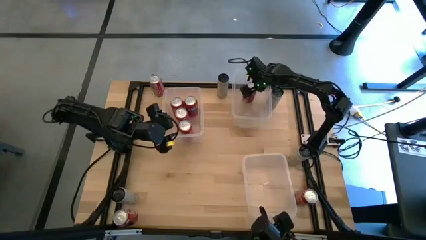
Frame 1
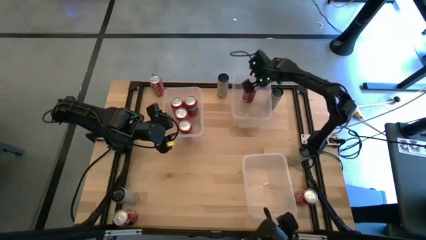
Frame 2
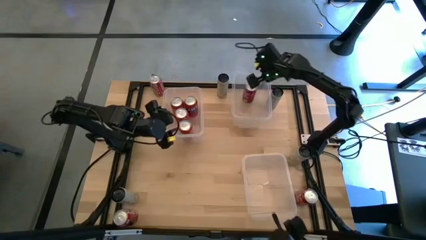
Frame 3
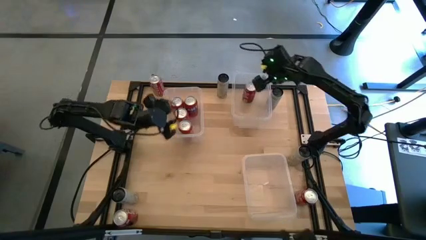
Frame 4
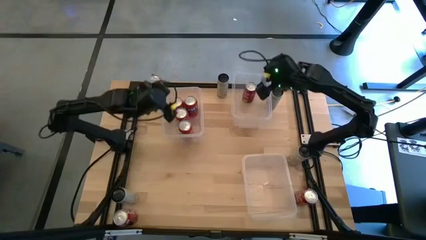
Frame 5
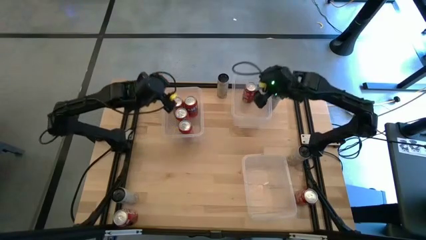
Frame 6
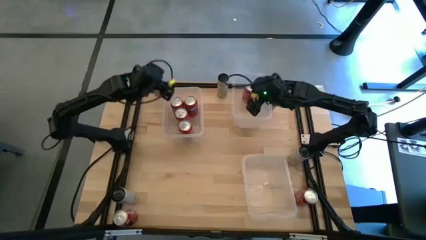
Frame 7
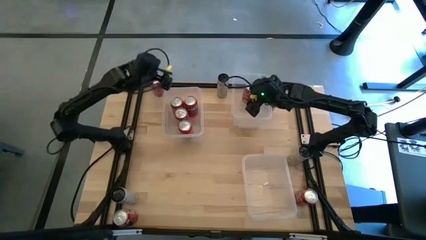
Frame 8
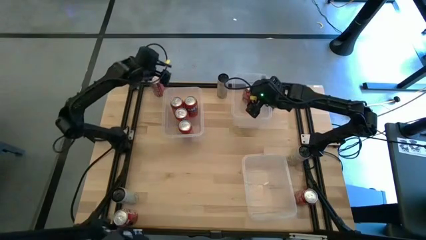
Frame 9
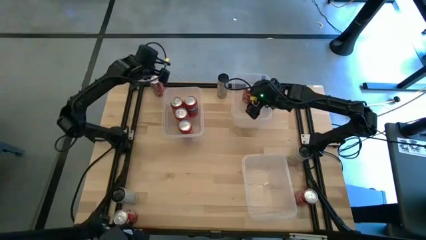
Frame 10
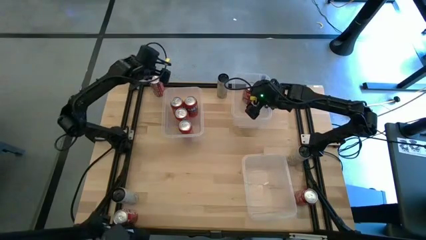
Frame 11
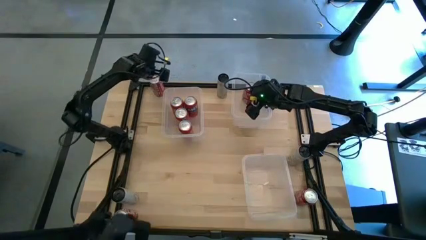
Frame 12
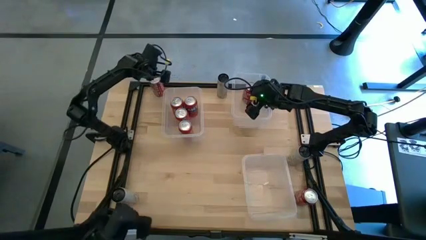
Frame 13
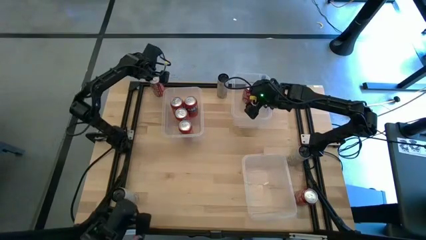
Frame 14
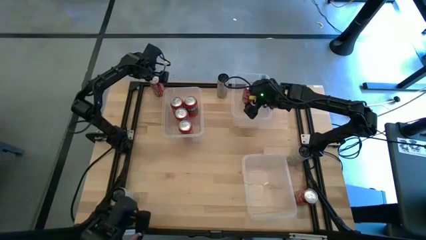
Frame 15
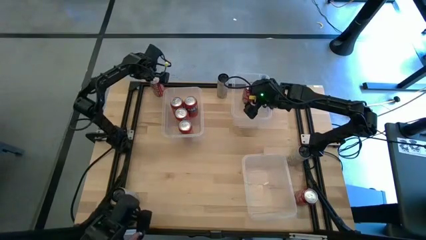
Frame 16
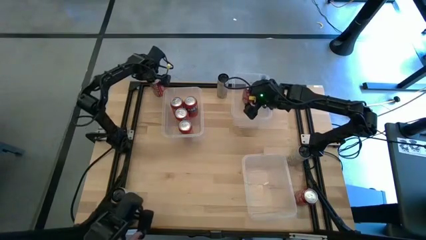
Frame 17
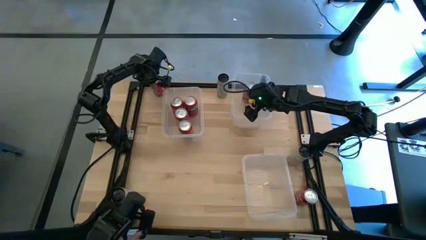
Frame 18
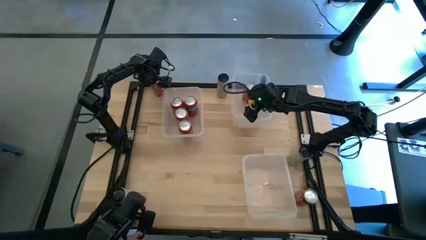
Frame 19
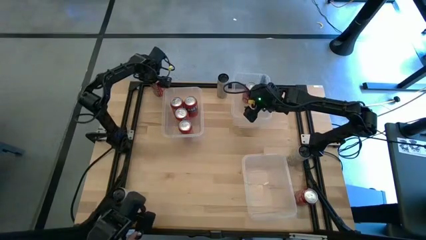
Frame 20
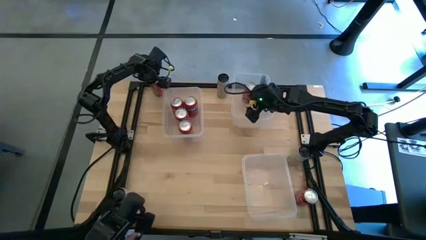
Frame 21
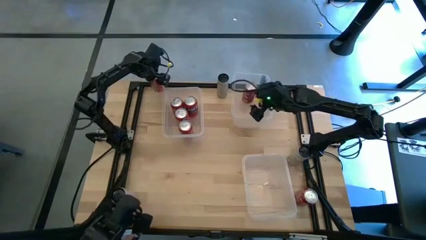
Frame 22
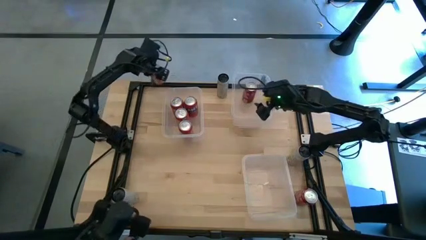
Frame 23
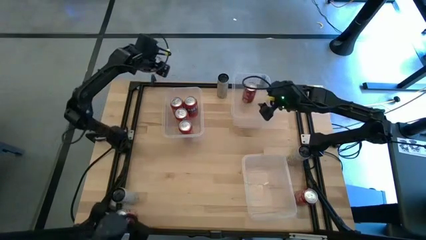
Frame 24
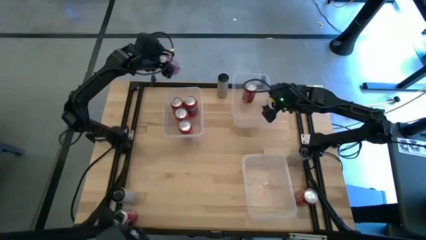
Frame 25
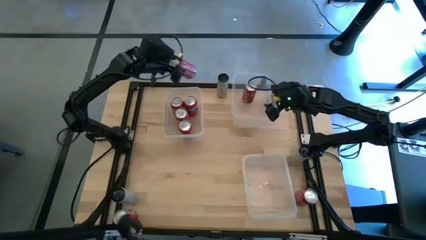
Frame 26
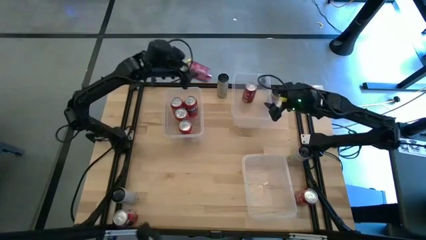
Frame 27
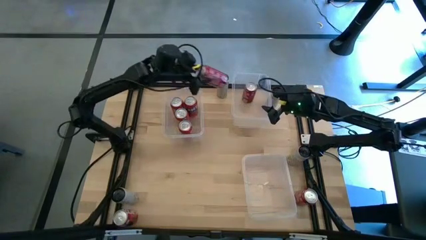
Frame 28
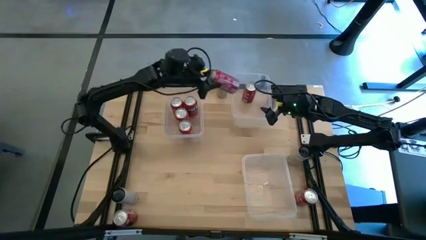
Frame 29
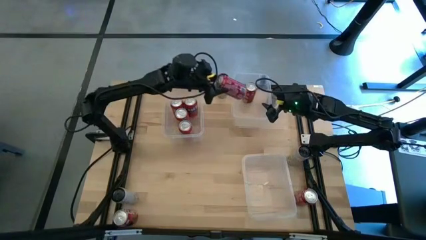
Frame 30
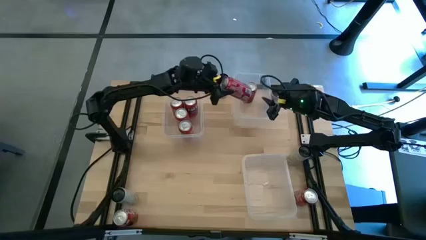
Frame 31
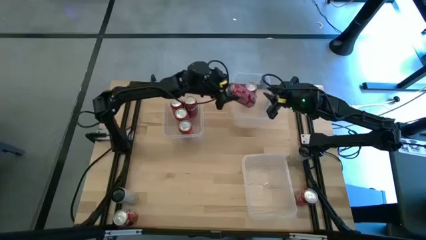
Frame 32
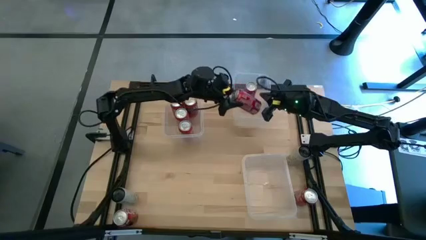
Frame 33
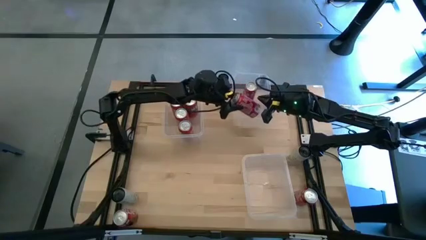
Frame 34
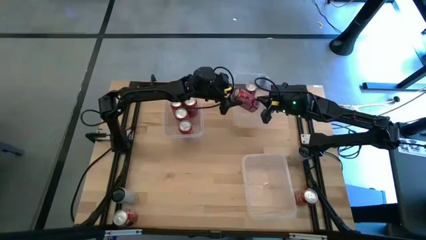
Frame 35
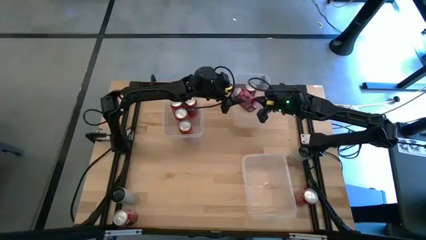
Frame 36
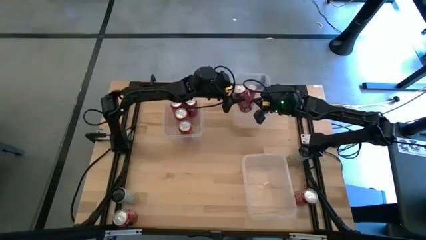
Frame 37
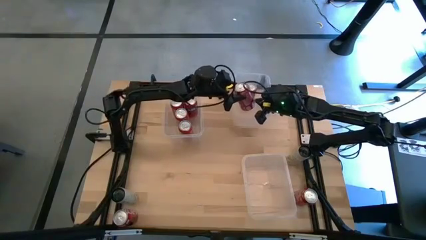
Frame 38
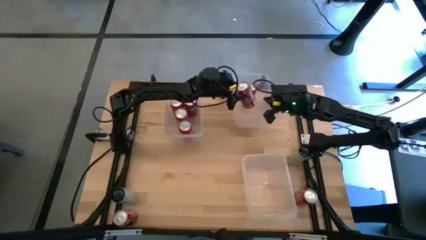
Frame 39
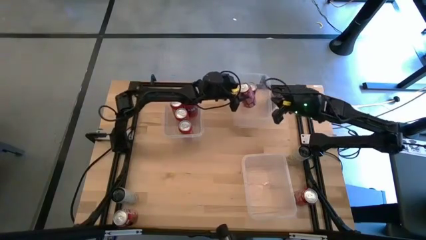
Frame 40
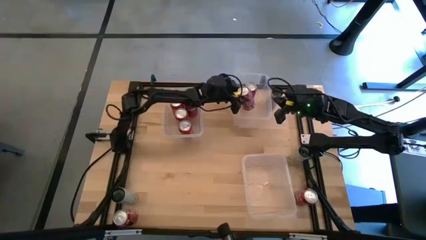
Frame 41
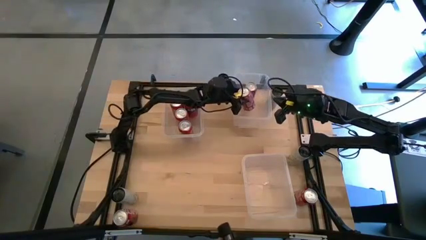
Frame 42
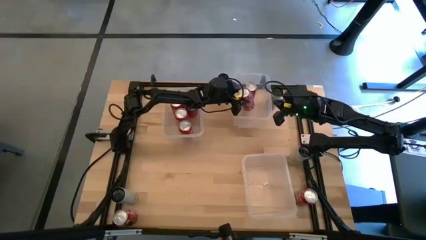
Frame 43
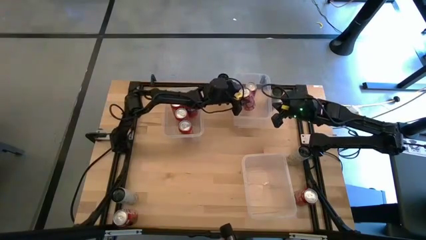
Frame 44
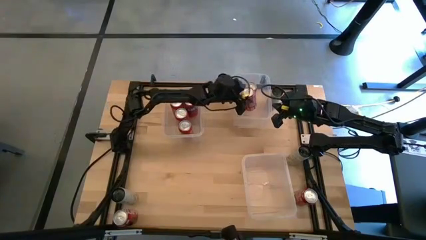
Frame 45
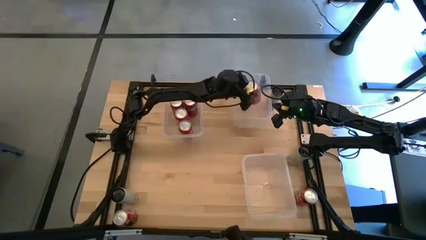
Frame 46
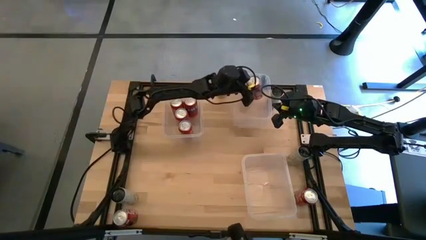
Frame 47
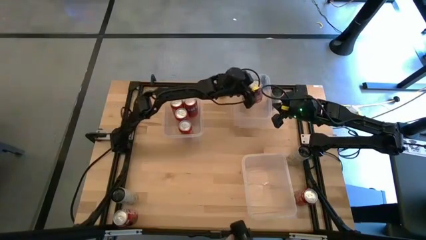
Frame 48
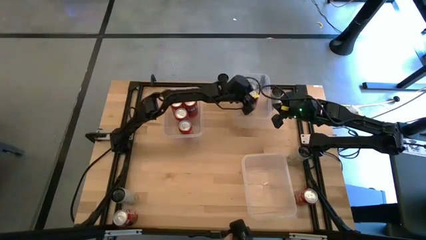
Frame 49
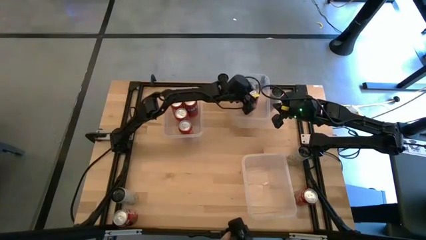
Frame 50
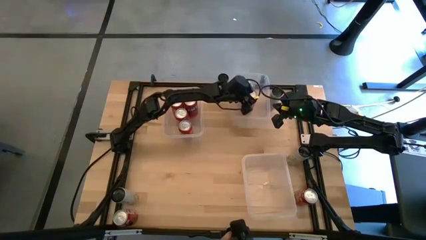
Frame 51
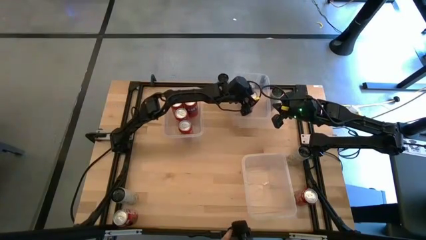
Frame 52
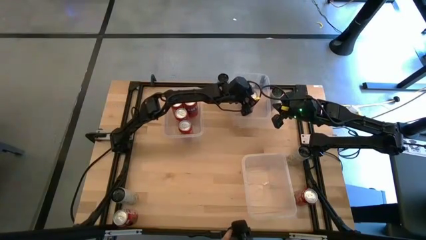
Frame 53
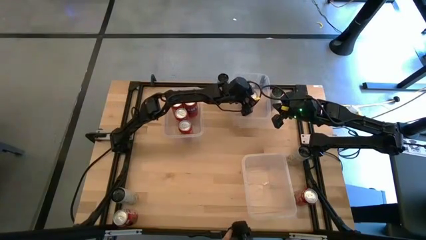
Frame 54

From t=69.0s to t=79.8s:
Task: Sort soda cans
Put the red-white soda can into the top right transparent bin

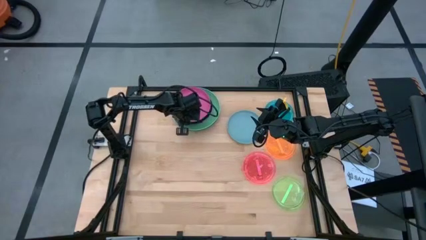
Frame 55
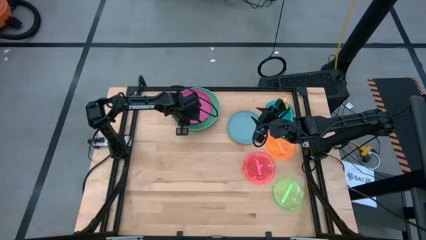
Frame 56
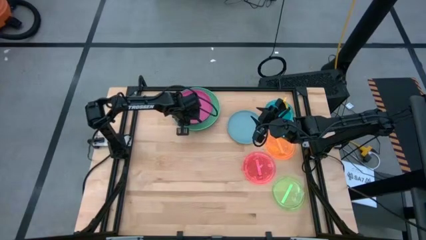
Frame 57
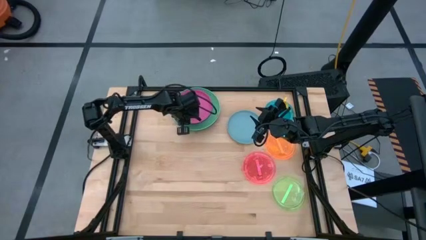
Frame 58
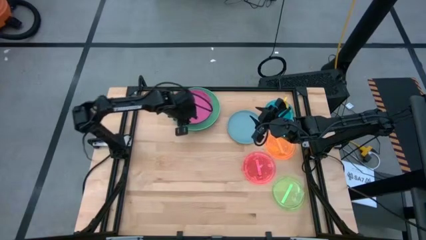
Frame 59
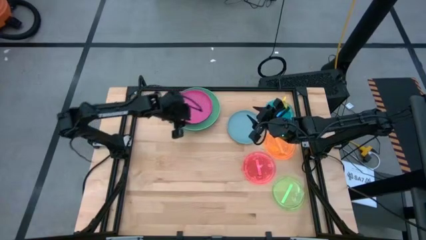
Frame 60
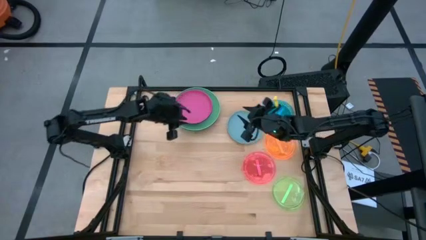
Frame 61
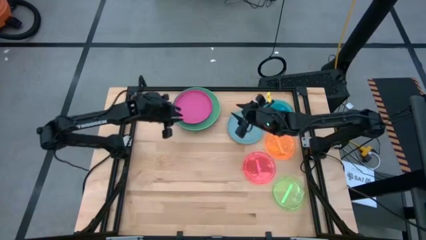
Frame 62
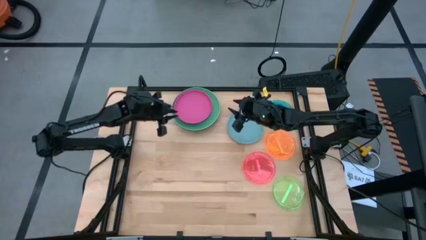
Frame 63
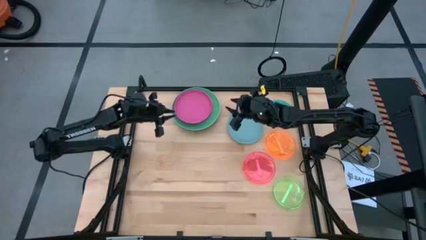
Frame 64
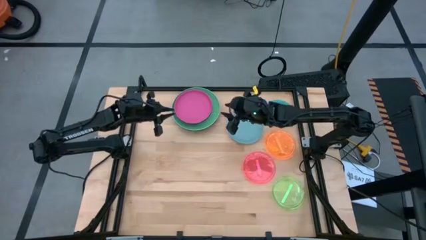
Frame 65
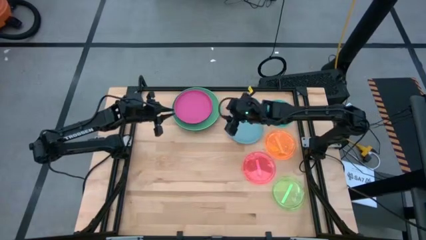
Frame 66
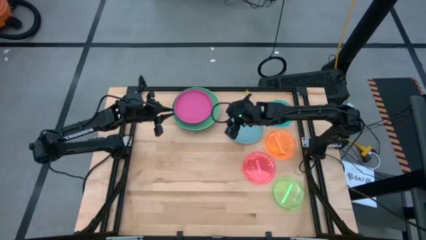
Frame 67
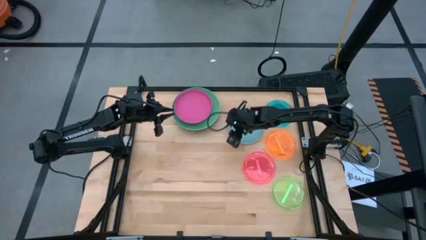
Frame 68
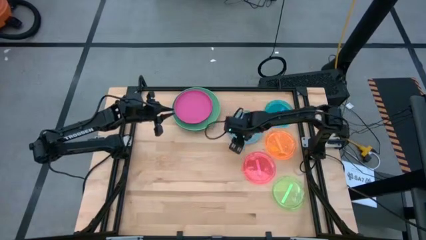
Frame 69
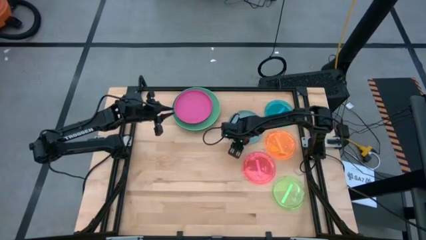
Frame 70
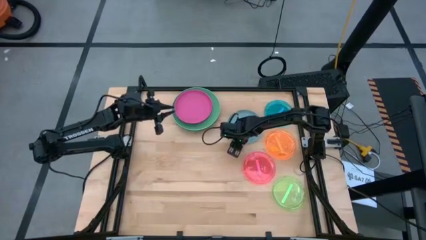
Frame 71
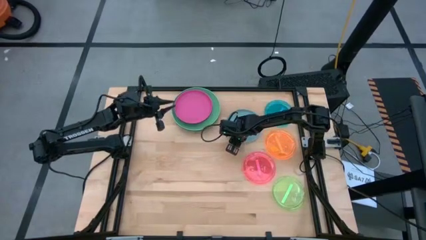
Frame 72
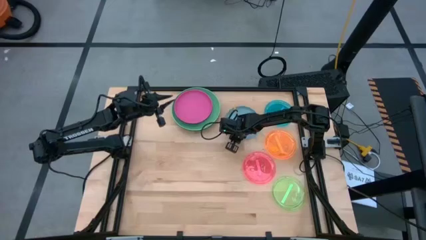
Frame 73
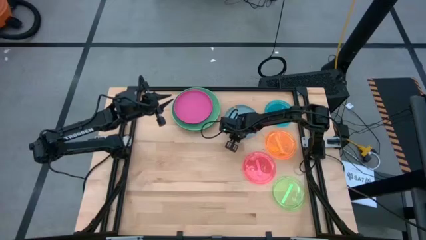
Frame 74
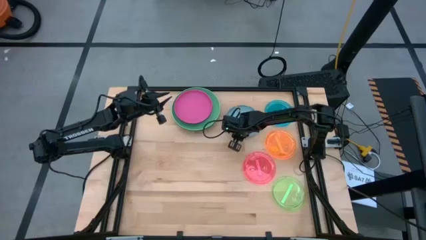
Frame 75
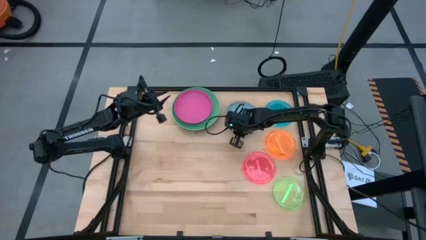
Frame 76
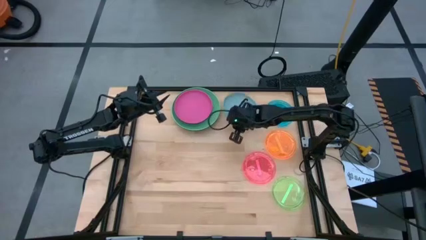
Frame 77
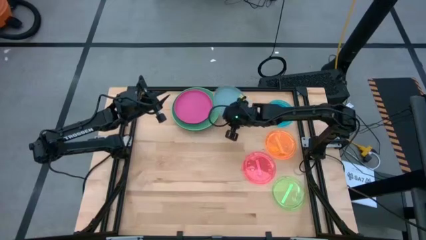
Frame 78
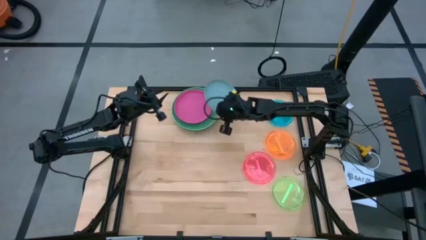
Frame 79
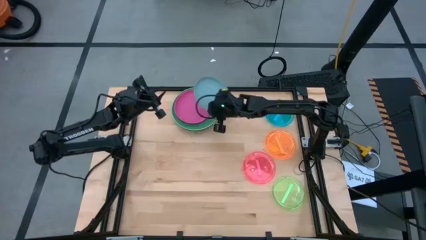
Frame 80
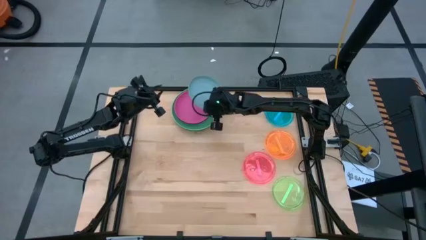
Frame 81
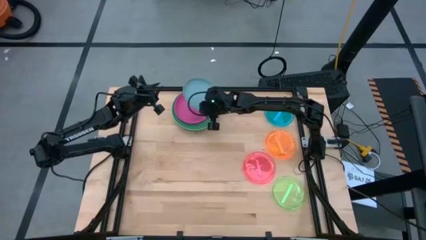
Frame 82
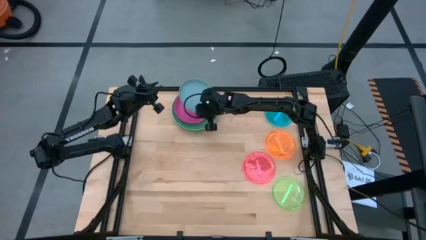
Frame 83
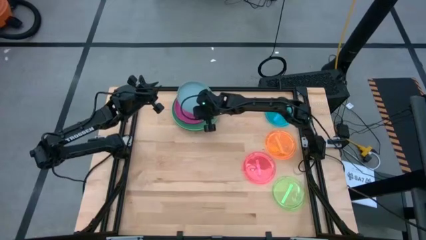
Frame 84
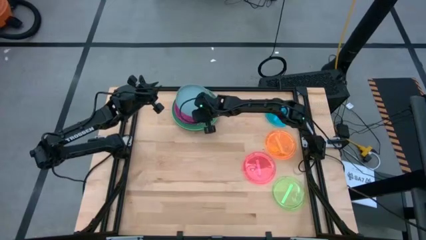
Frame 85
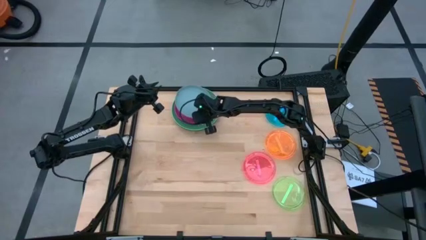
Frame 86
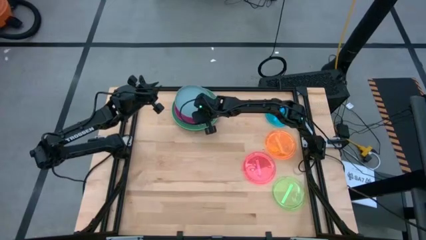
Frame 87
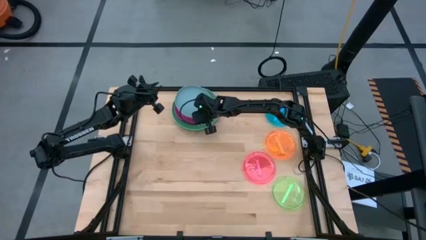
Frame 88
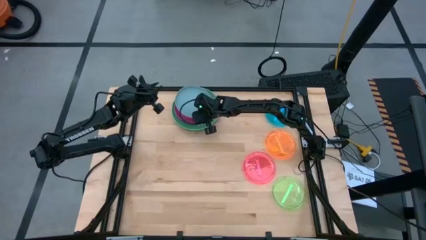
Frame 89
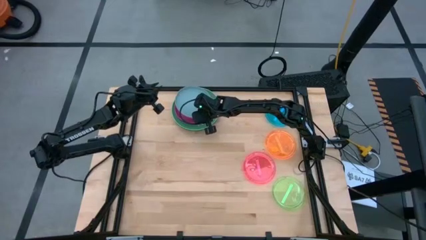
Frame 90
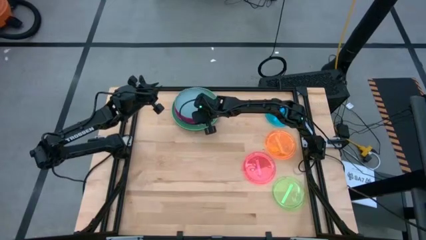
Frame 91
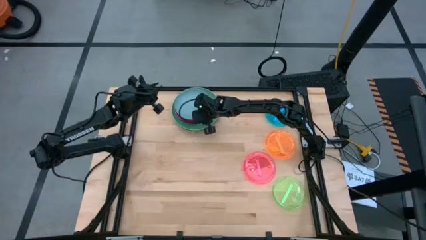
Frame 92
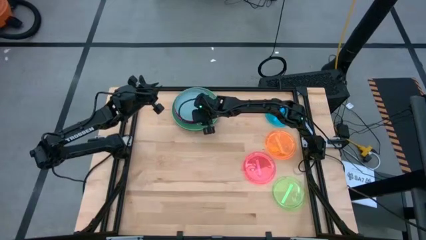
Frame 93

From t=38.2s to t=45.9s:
Task: Stack plastic plates
Stack the light blue plate on the pink plate
